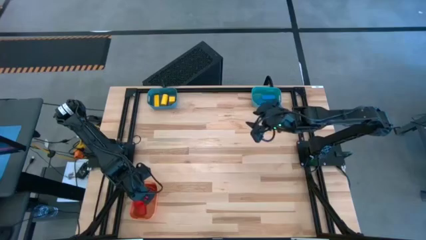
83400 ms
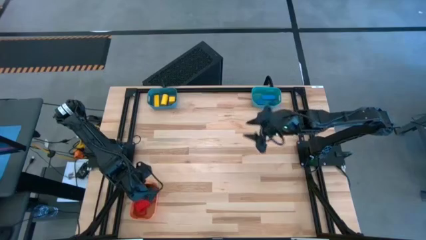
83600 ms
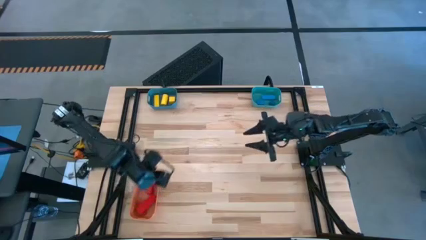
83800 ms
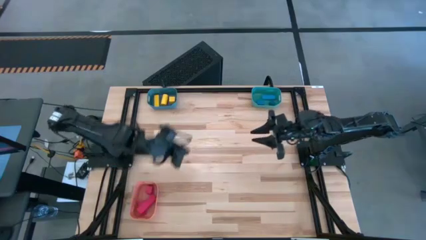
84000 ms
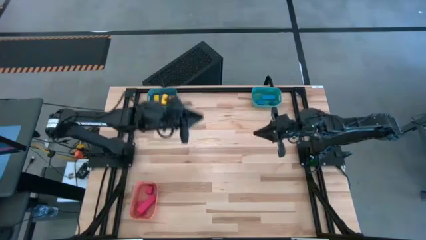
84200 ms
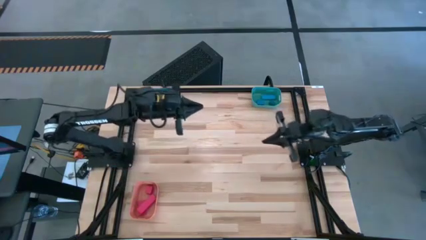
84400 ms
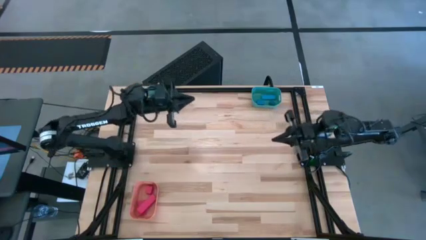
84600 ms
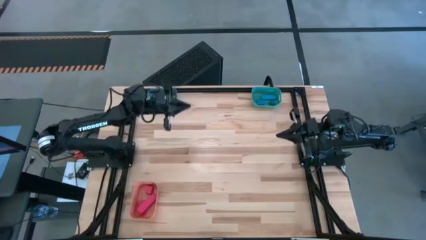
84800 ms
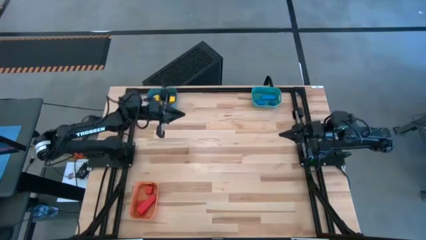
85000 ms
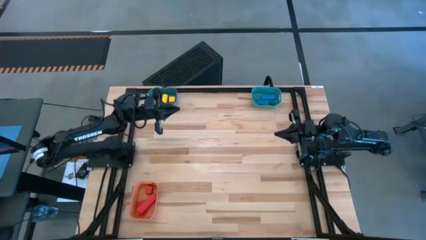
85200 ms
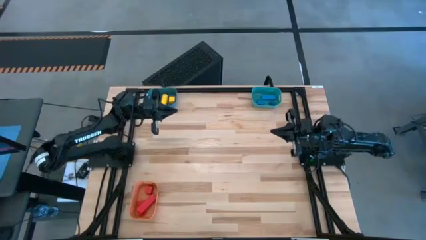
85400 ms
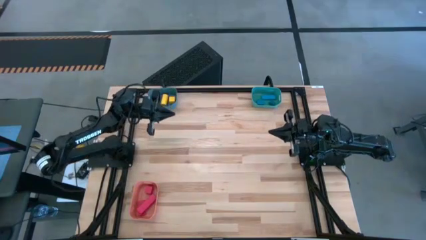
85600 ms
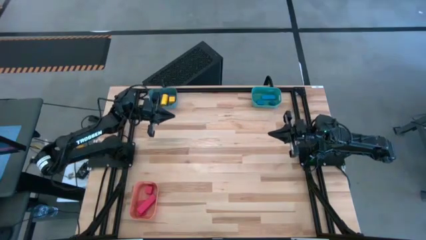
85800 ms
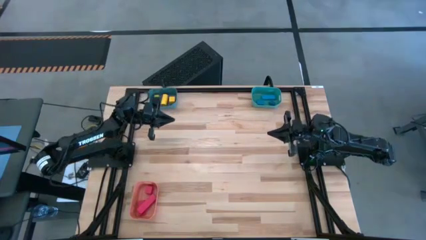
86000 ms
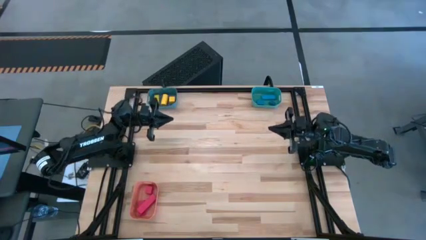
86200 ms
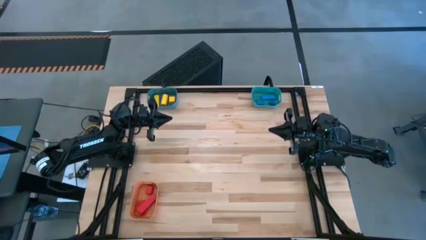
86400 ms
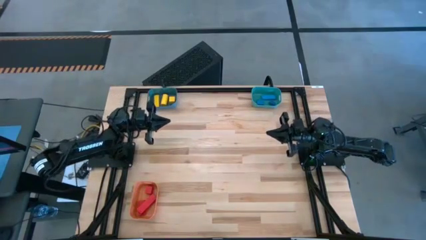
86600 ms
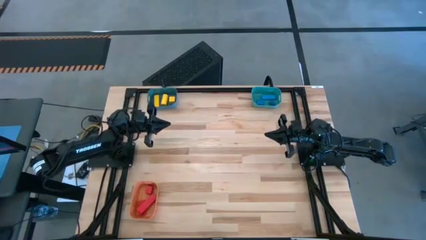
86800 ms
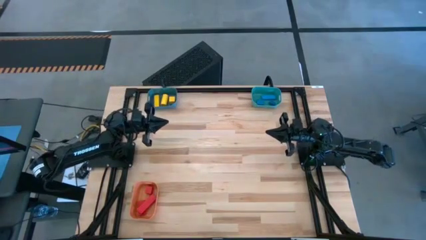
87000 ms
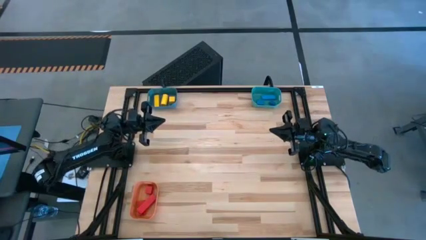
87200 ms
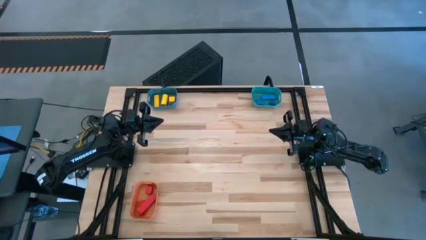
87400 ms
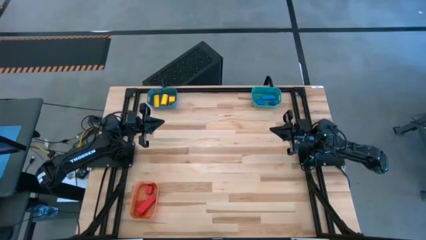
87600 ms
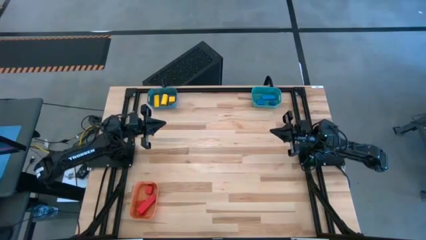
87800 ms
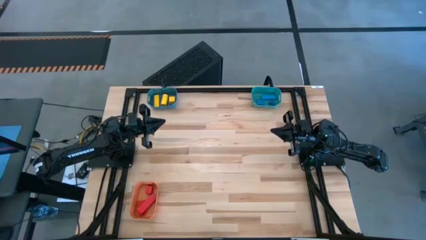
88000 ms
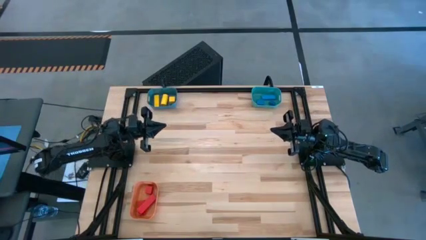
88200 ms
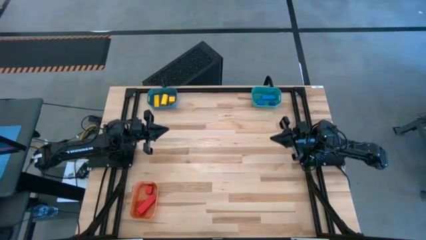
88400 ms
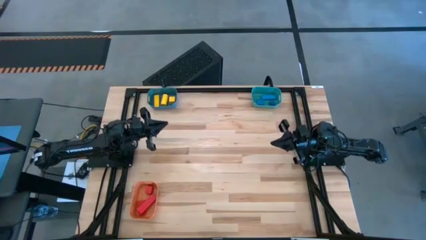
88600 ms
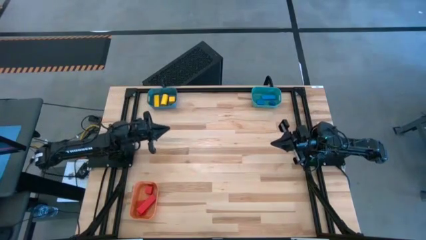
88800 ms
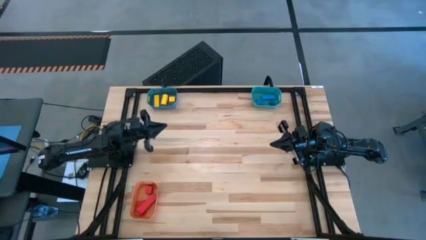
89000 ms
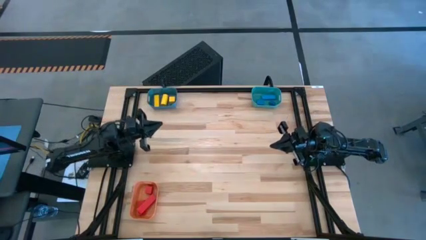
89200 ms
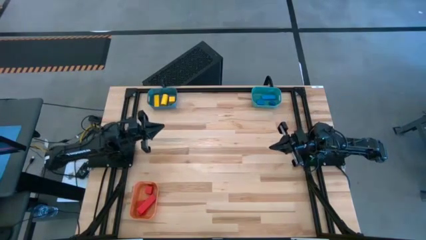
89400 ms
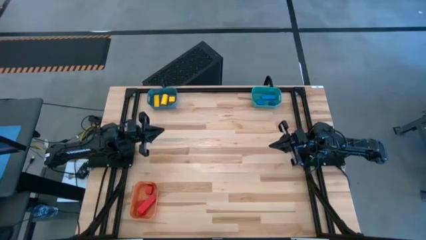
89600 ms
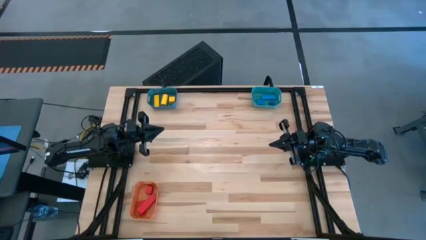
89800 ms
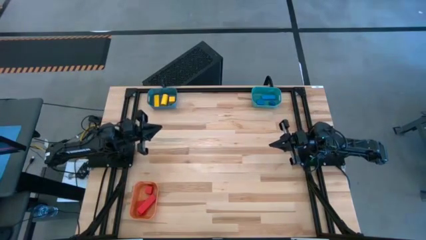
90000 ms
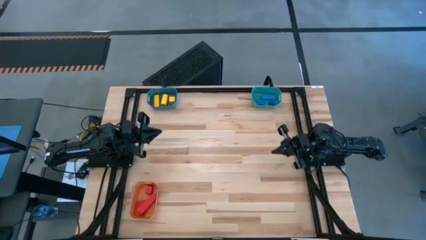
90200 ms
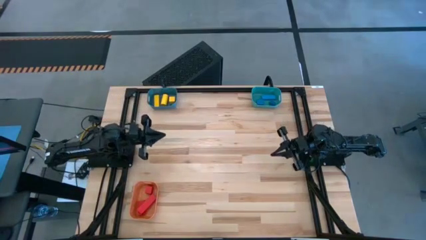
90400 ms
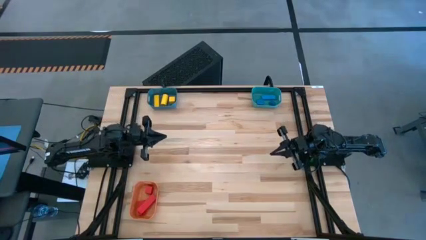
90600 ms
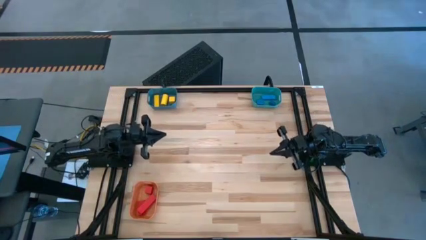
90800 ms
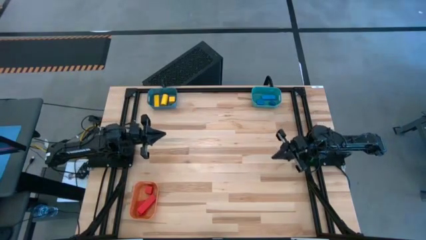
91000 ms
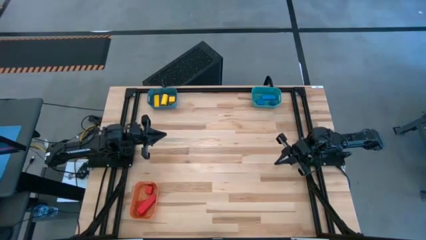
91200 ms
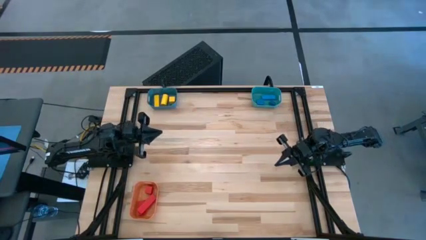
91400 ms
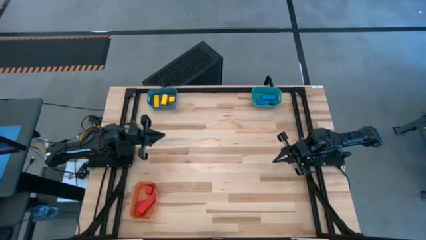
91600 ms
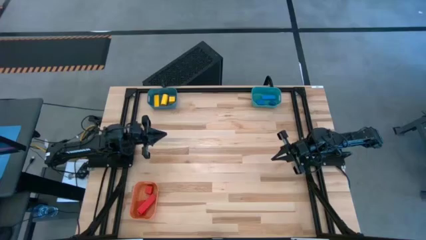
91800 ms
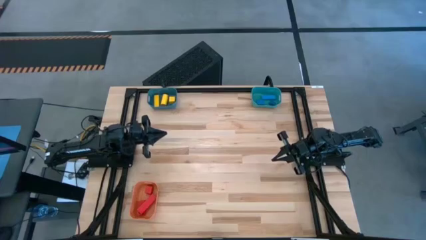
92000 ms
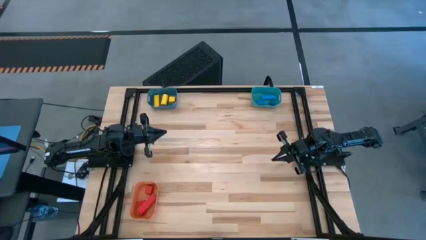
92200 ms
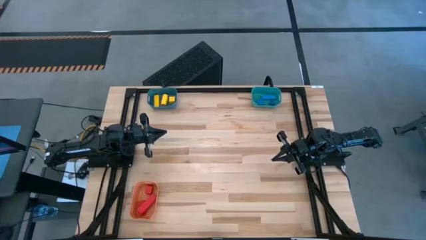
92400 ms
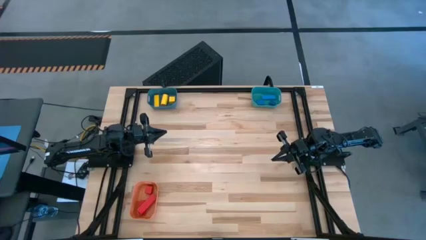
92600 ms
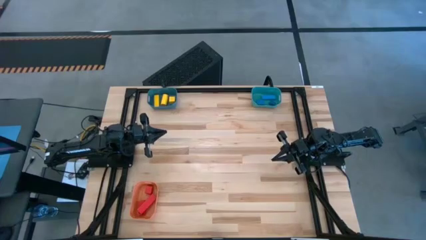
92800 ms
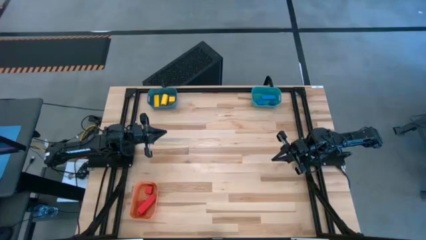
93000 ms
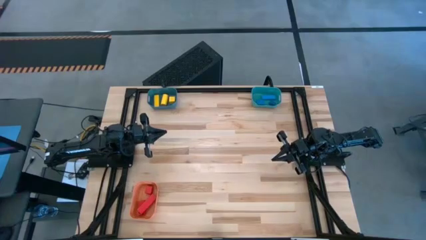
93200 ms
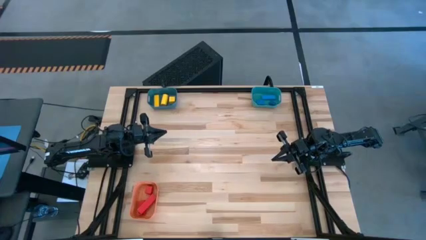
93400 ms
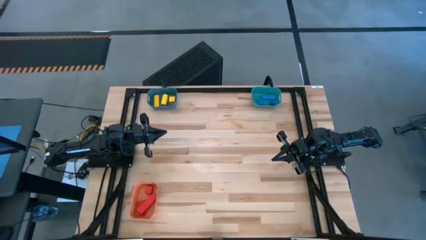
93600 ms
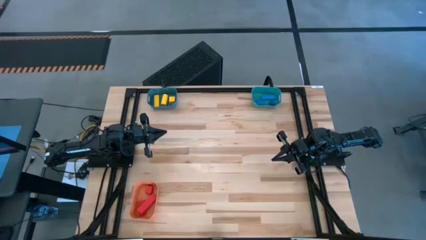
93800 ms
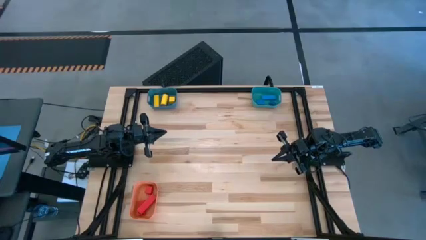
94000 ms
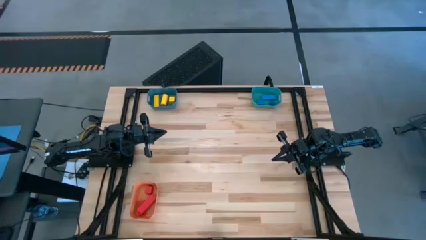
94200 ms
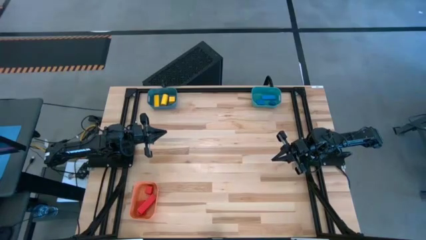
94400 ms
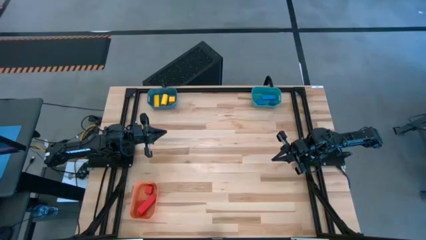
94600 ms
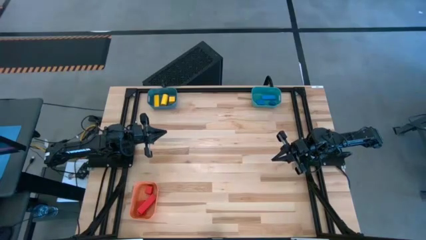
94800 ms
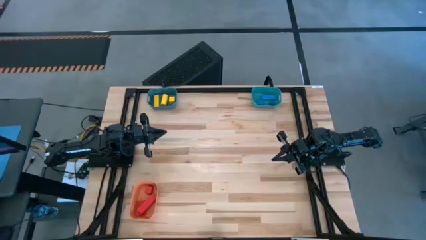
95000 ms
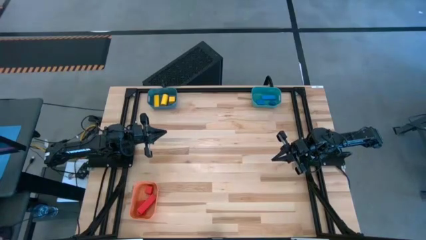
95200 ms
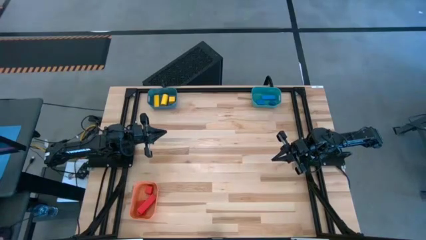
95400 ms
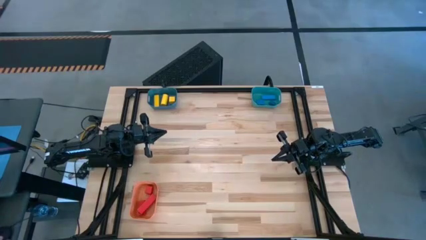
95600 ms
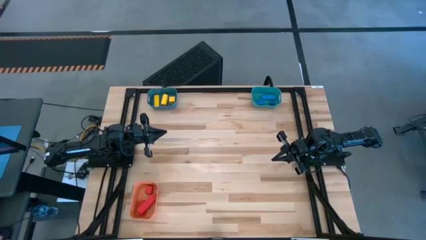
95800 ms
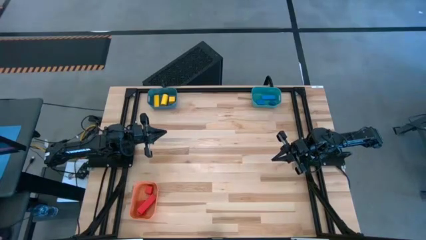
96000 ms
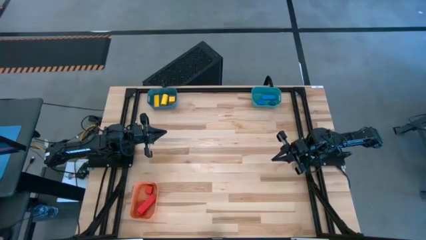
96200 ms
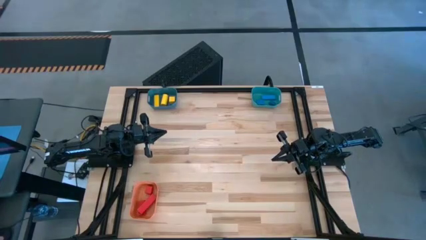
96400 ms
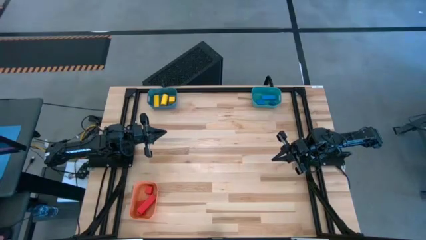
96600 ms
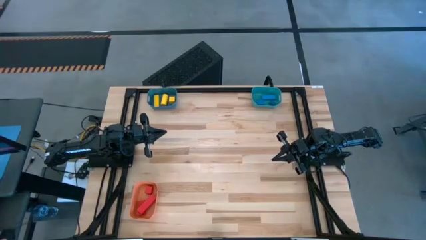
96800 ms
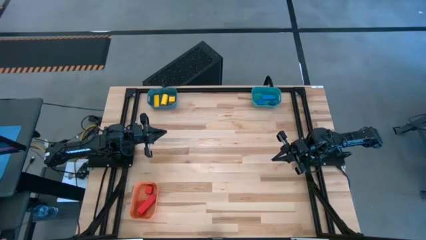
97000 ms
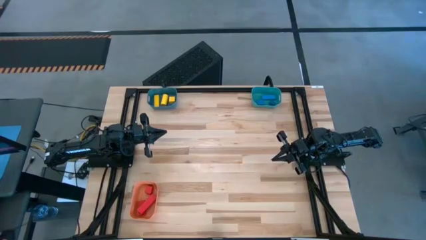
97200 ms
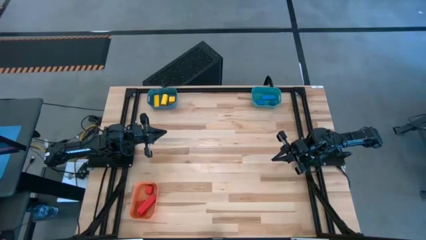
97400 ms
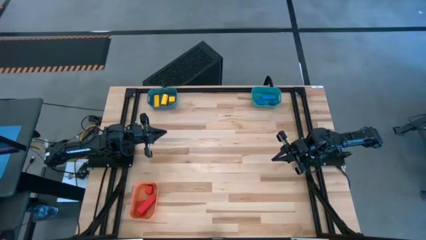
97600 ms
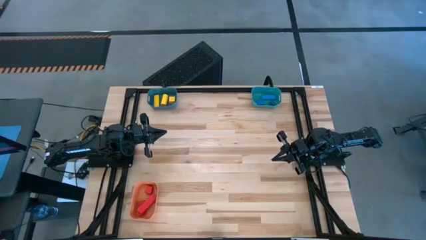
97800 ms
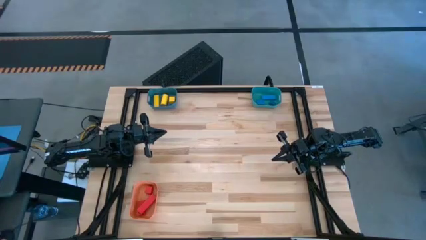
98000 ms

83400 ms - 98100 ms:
Task: Sort & place blocks by color
Return to Home Position
